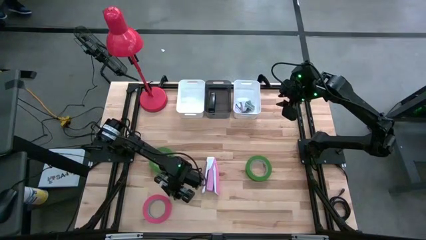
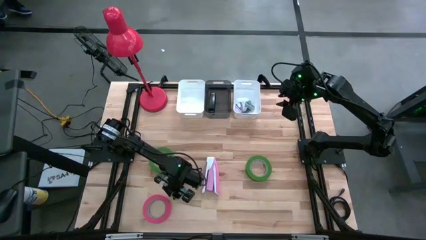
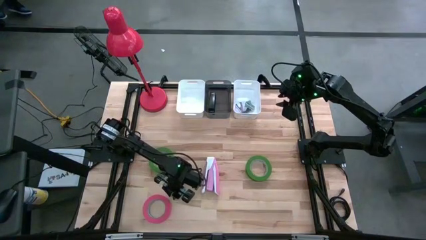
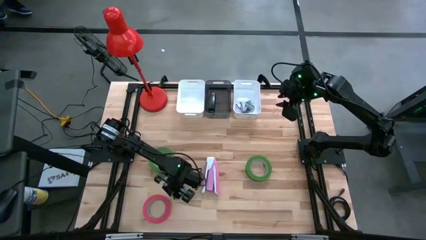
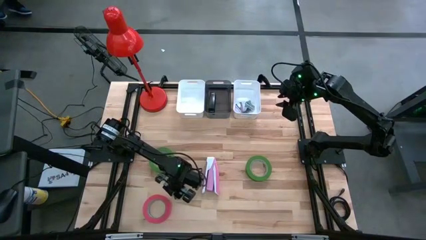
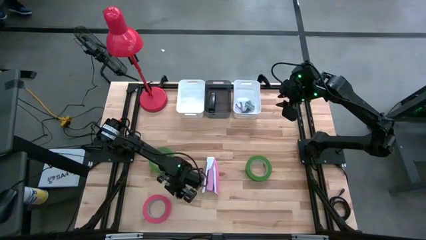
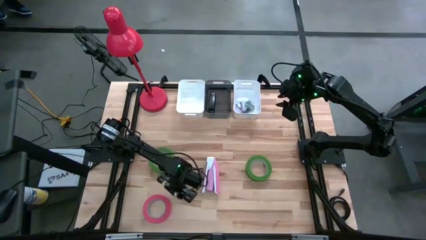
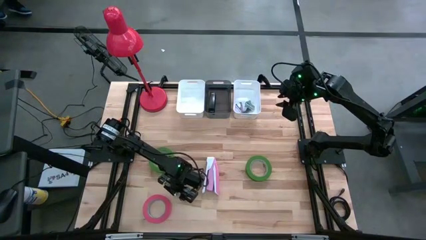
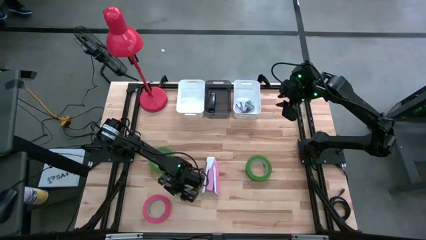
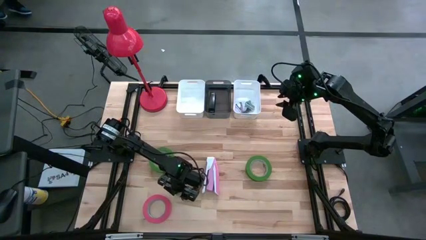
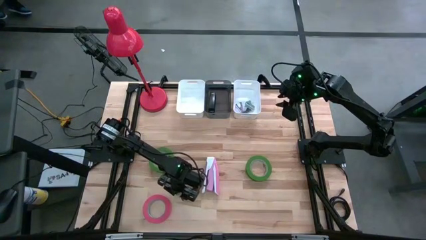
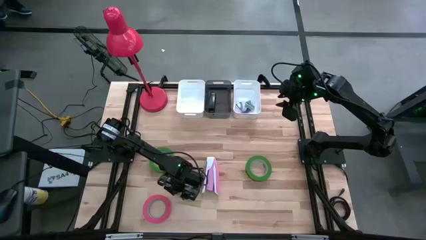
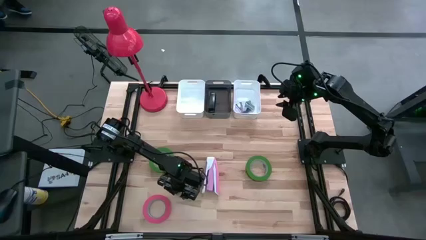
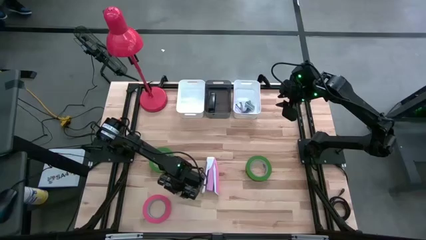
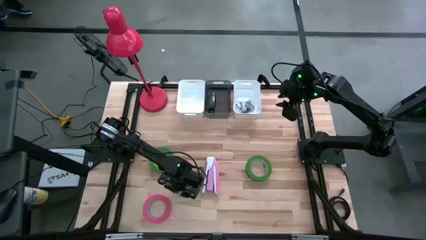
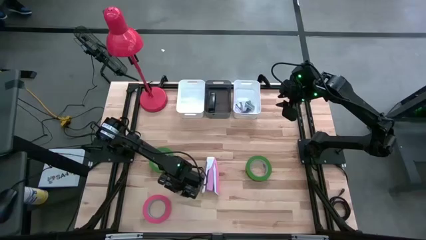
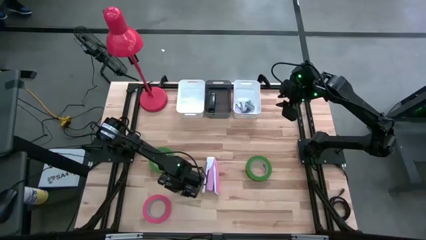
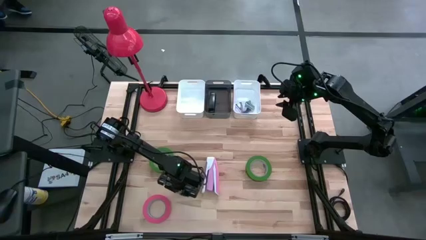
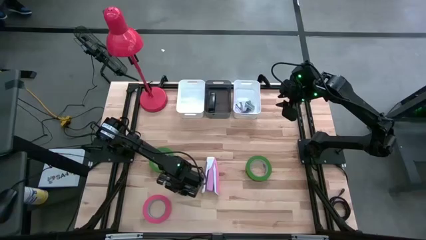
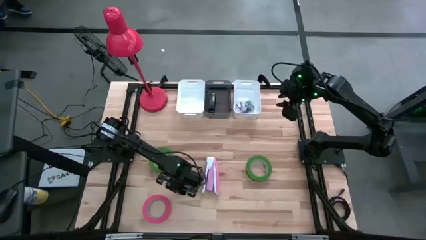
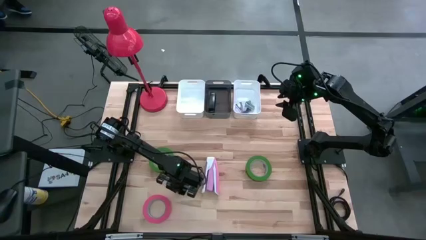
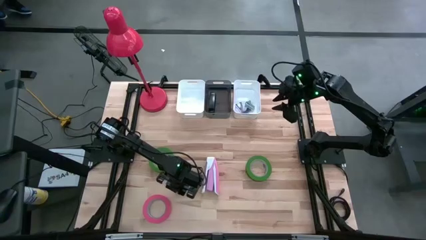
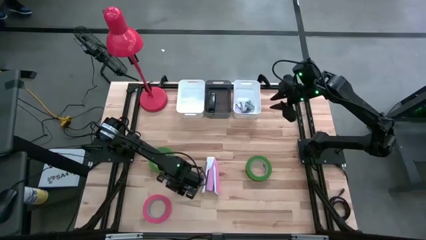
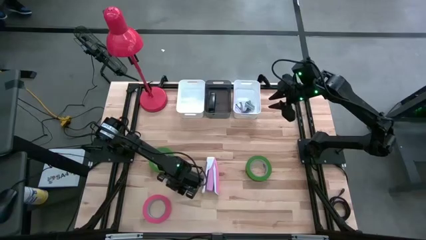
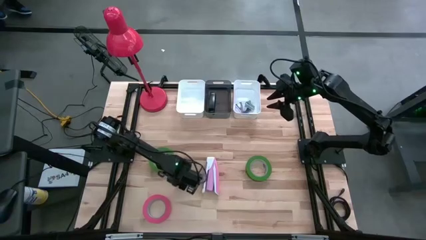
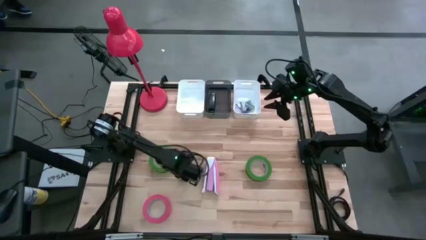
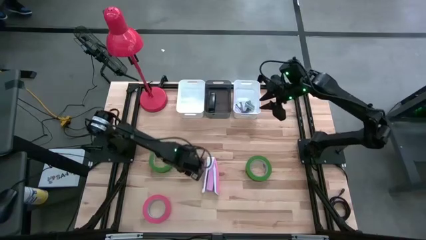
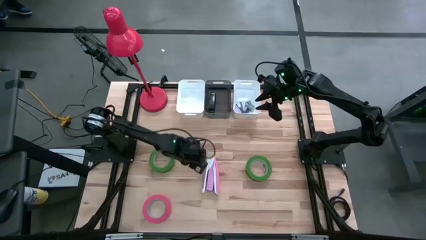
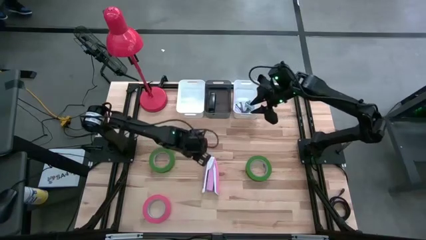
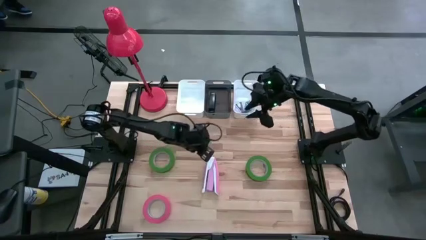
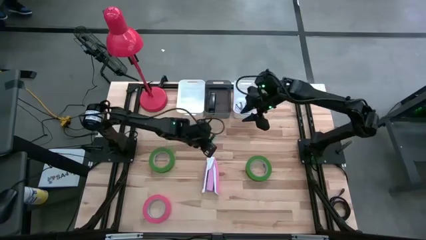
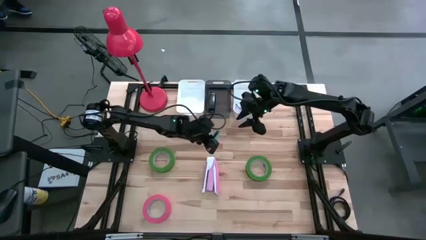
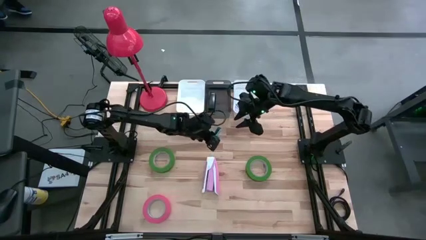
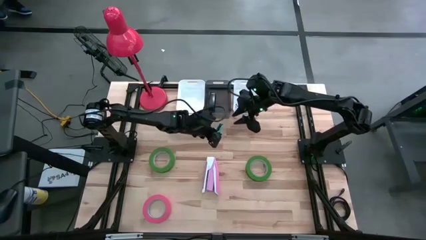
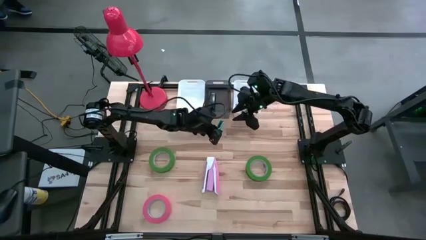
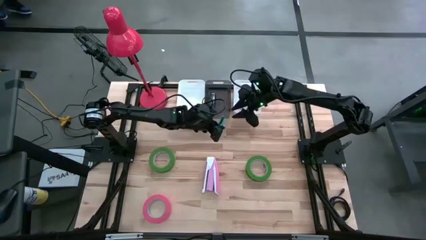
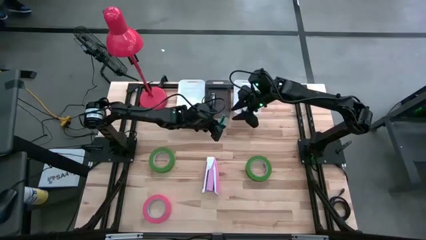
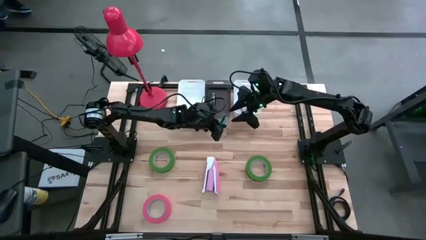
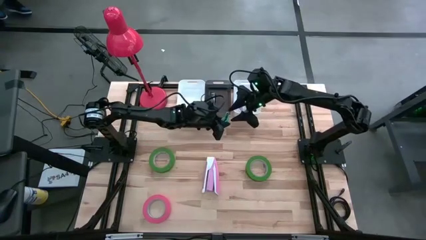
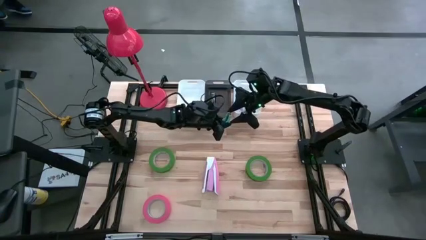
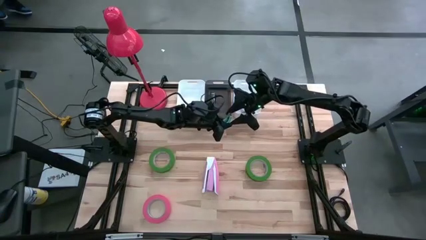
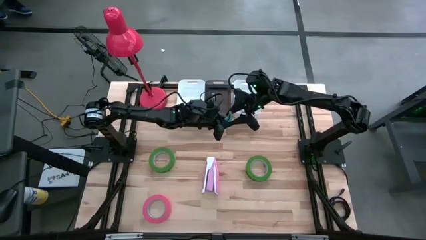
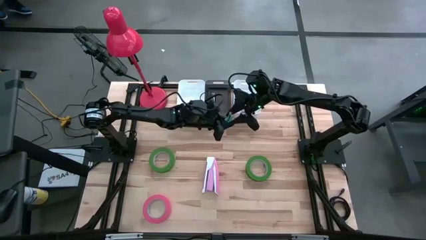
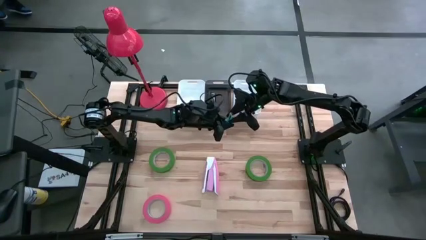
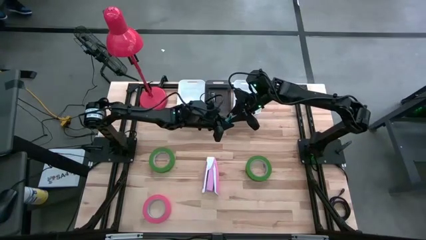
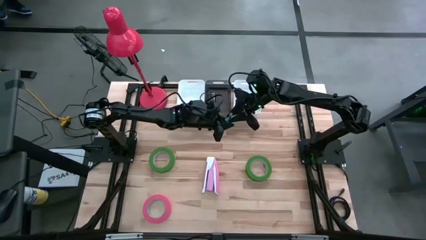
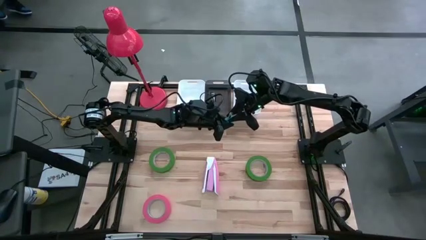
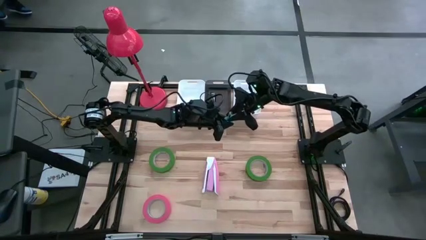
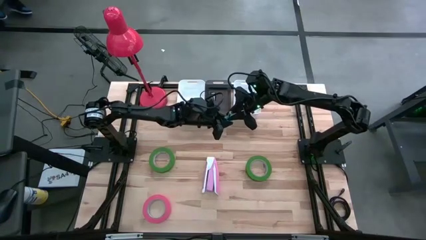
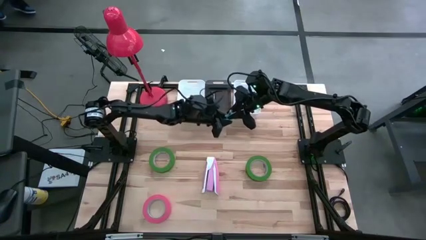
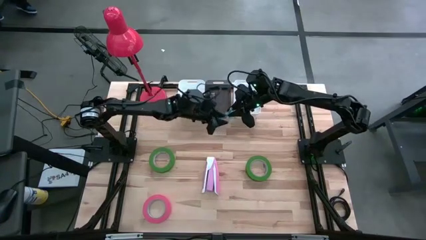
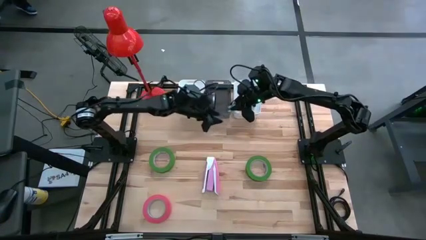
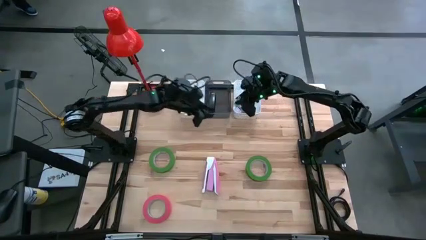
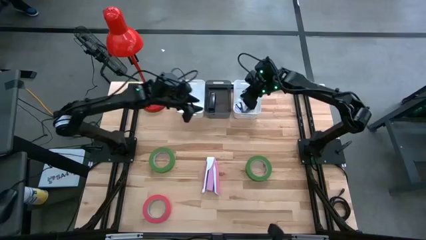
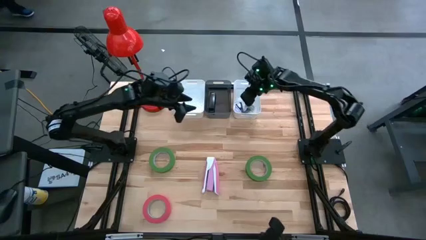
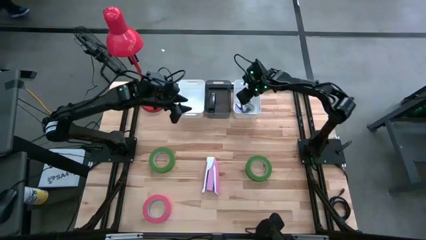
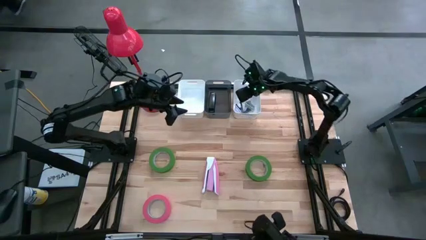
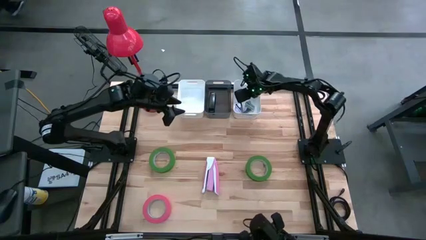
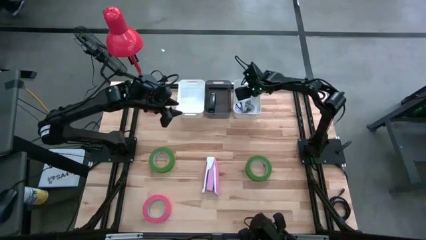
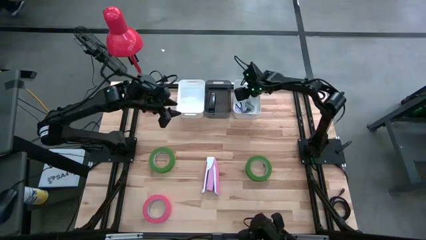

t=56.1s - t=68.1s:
Task: Pick and place Stapler, Stapler remover, tape
Put the light blue staple into the right white bin
